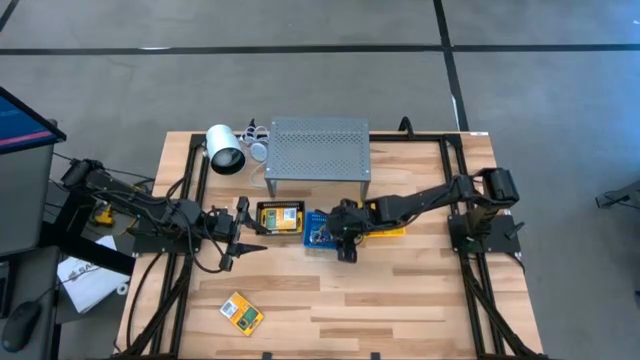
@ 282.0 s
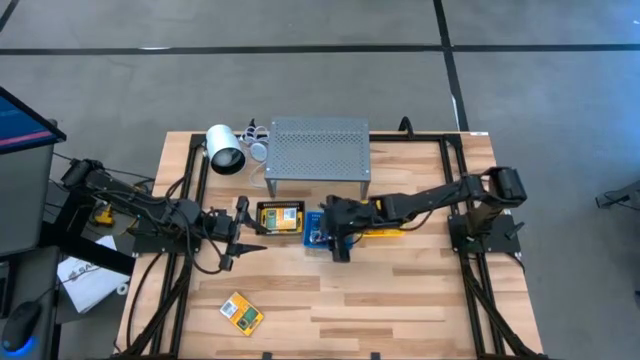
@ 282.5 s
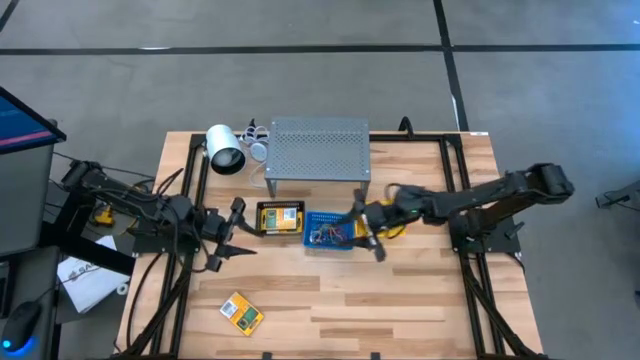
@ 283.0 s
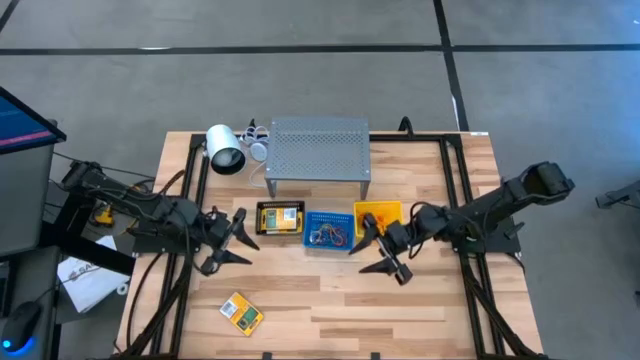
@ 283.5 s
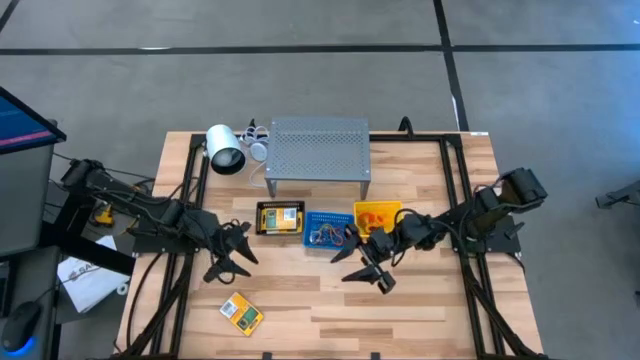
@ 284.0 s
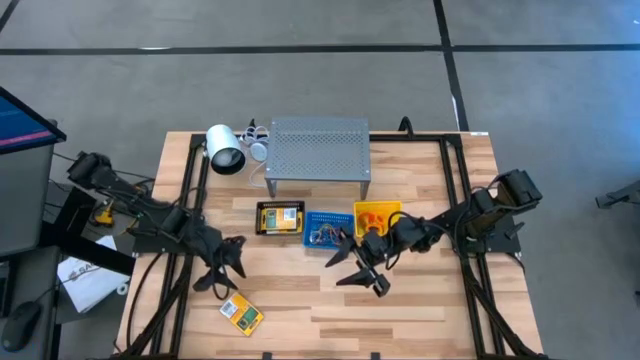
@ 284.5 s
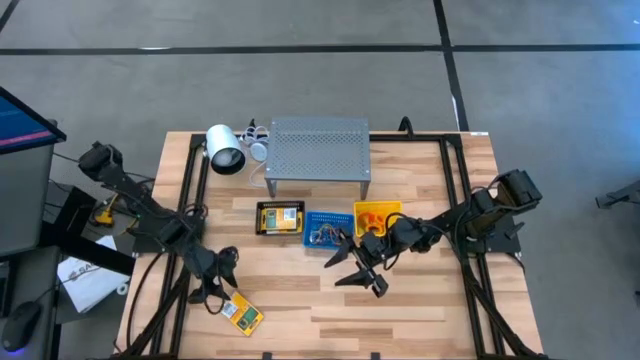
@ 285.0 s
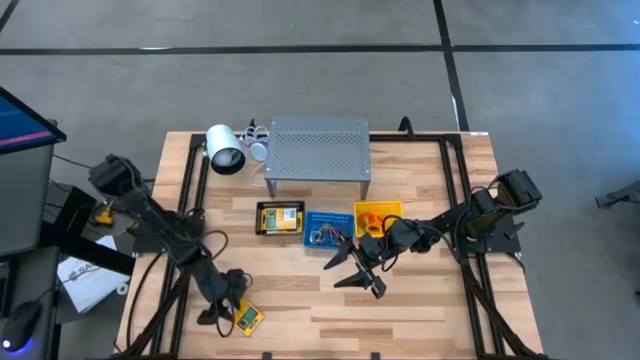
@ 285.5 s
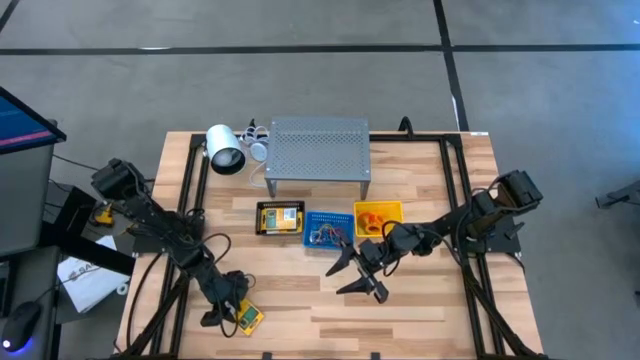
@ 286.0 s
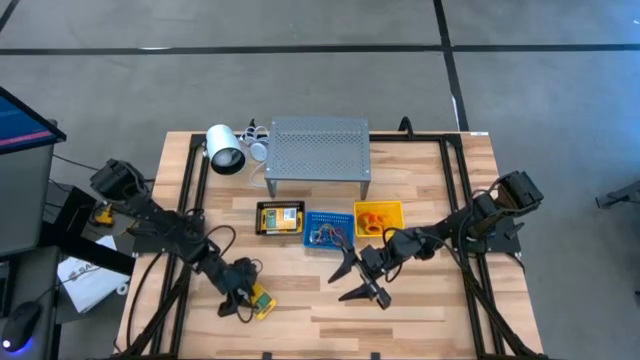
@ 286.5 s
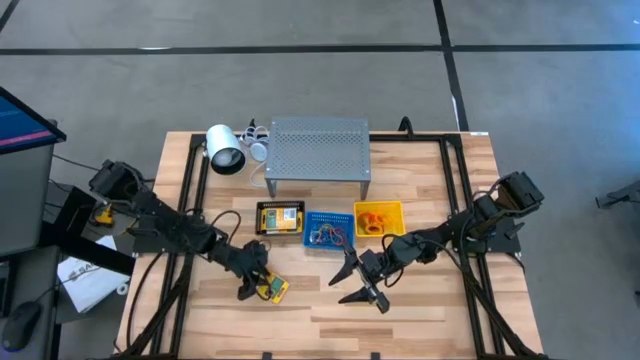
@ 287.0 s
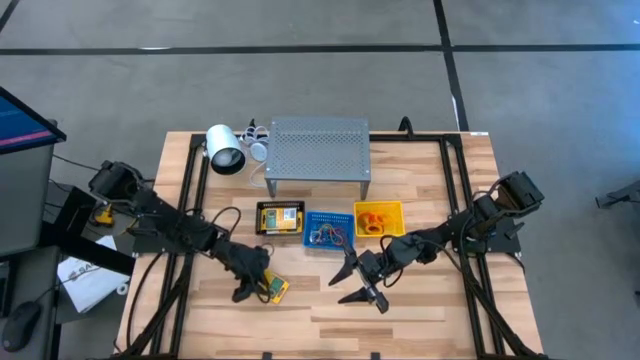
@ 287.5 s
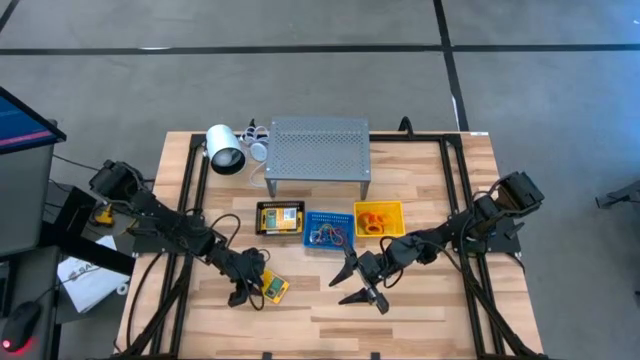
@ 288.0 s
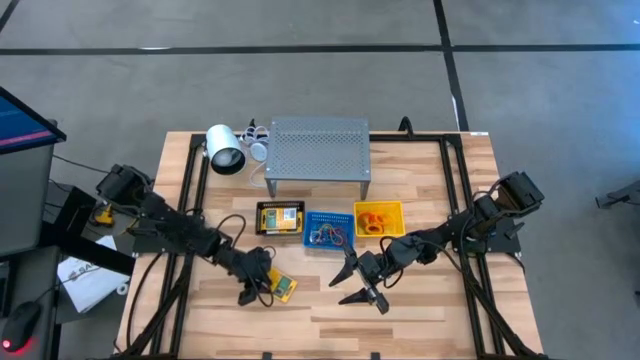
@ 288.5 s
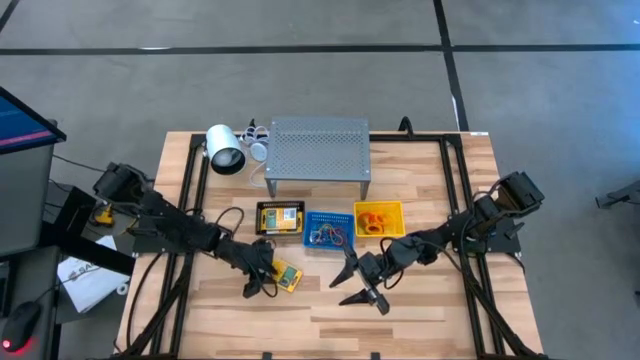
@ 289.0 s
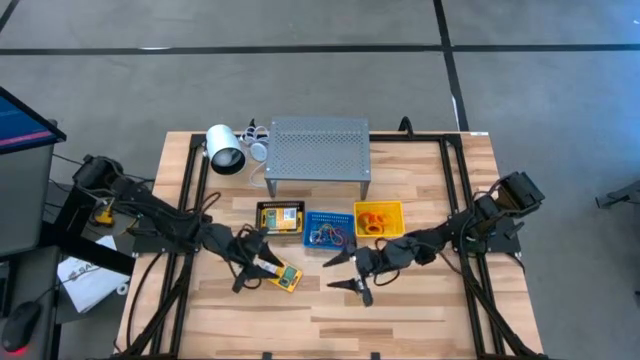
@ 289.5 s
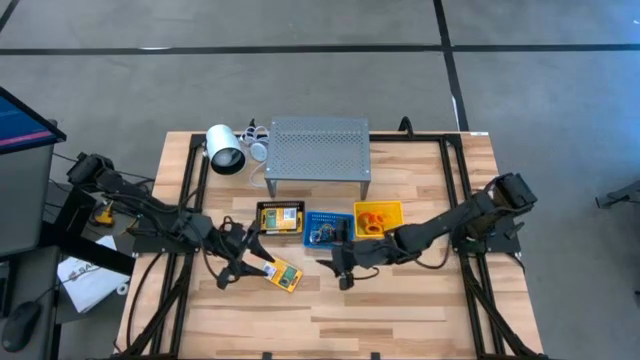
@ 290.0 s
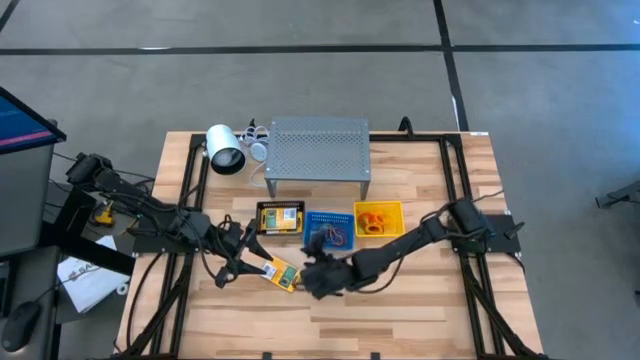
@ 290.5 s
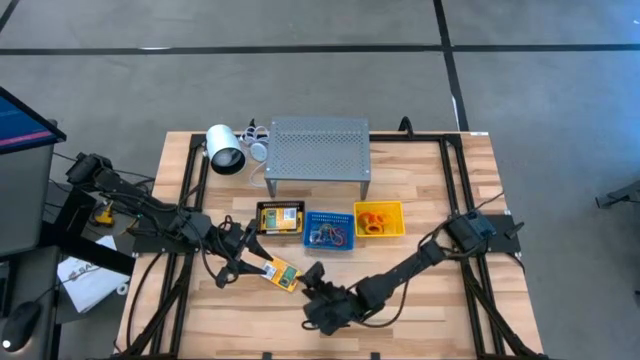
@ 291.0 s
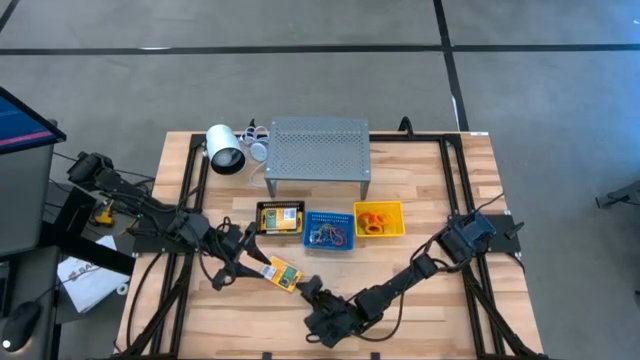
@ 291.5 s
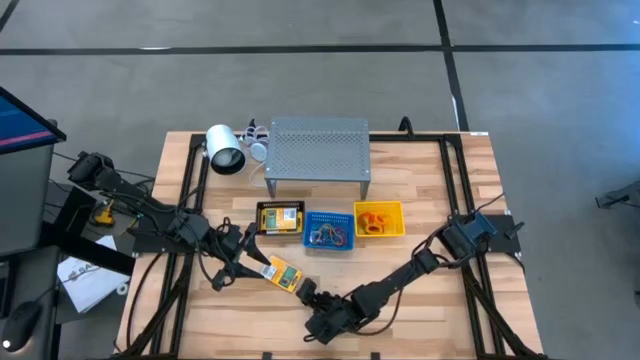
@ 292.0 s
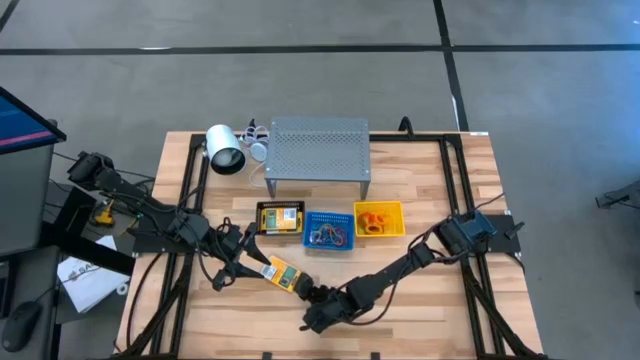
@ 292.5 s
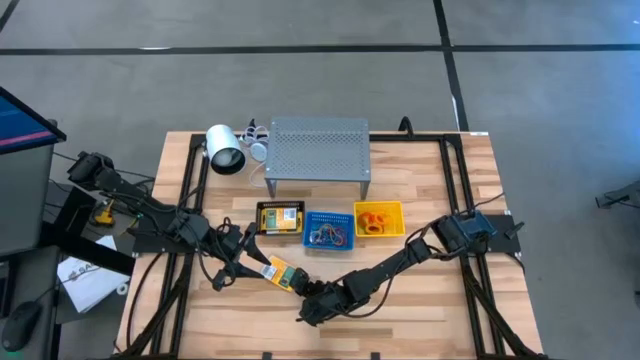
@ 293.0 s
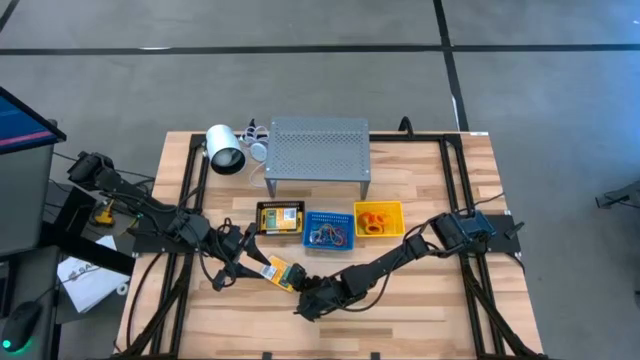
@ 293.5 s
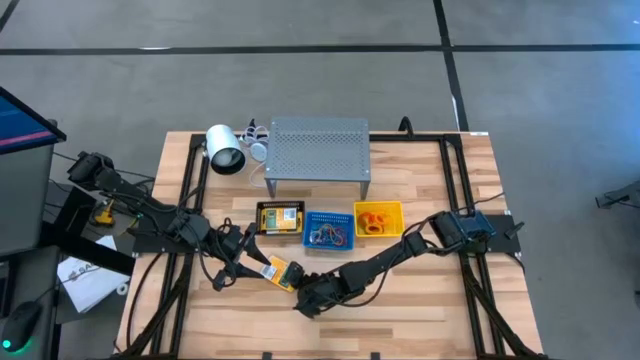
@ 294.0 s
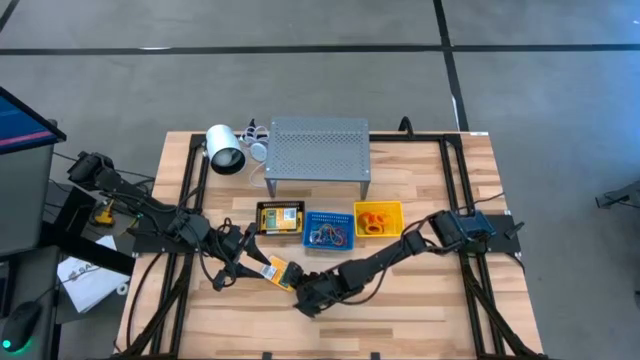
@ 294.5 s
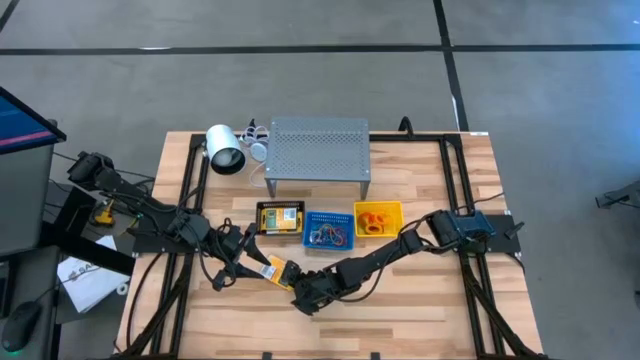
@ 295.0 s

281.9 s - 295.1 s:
Task: Pick & Place Office Desk Supplies
Put the box of crayons into the black bin

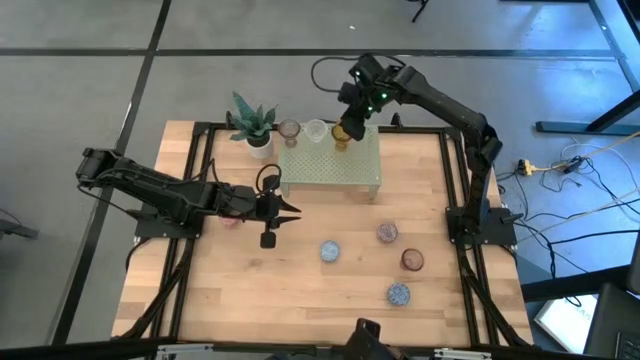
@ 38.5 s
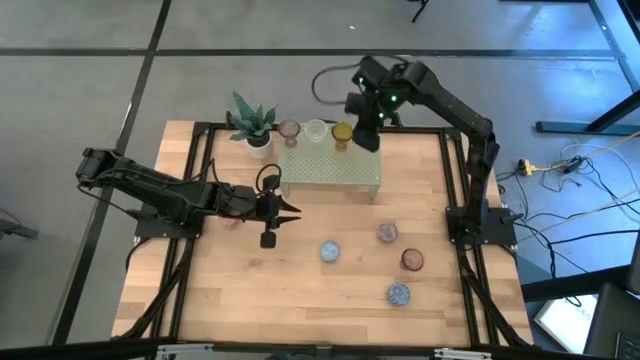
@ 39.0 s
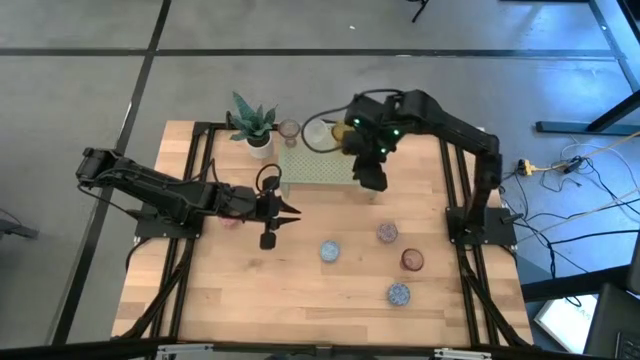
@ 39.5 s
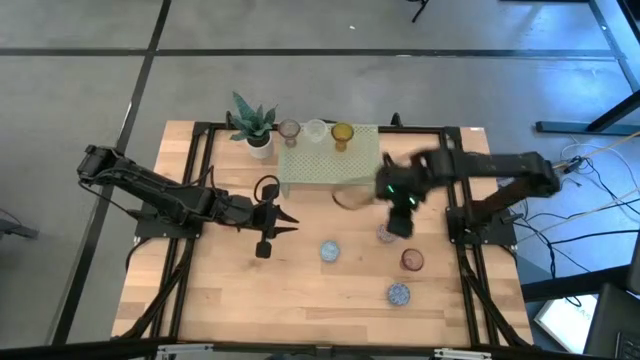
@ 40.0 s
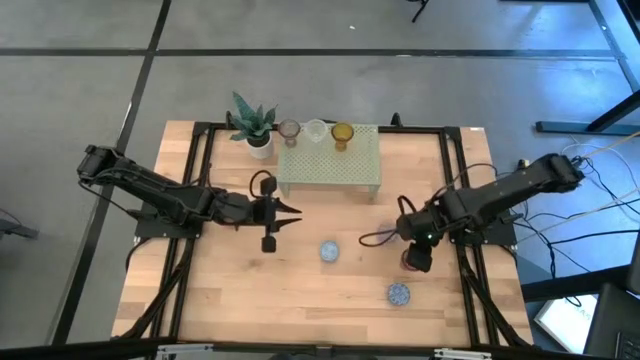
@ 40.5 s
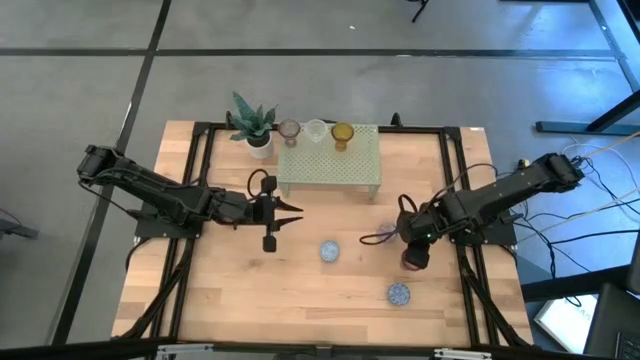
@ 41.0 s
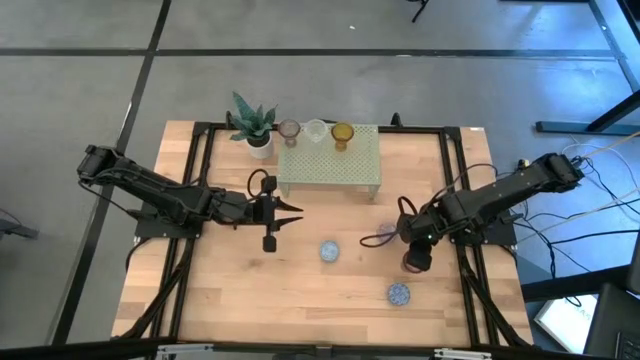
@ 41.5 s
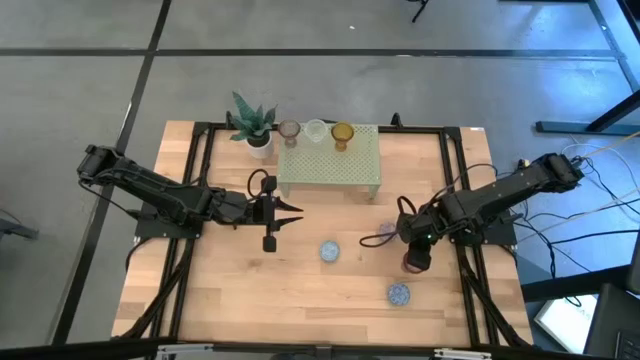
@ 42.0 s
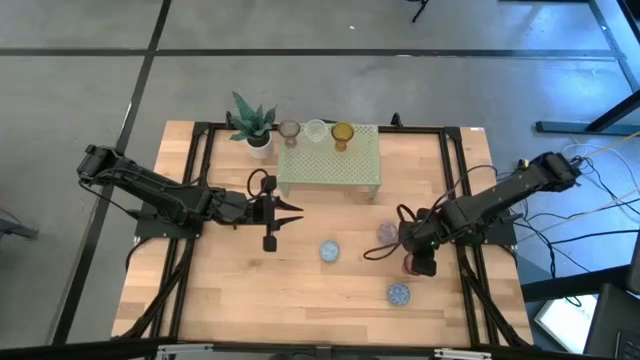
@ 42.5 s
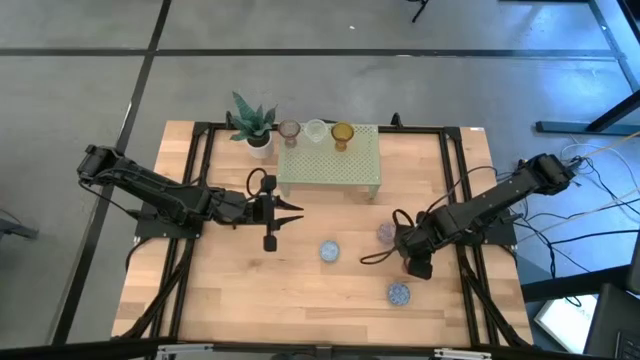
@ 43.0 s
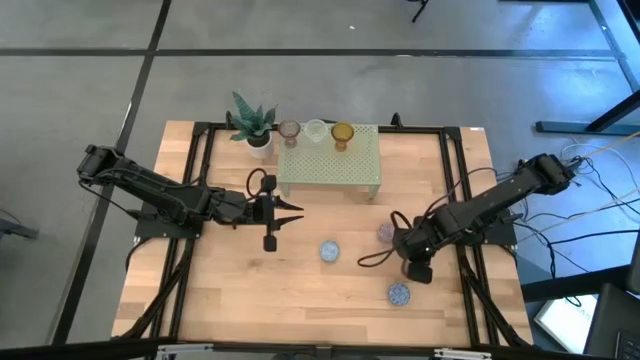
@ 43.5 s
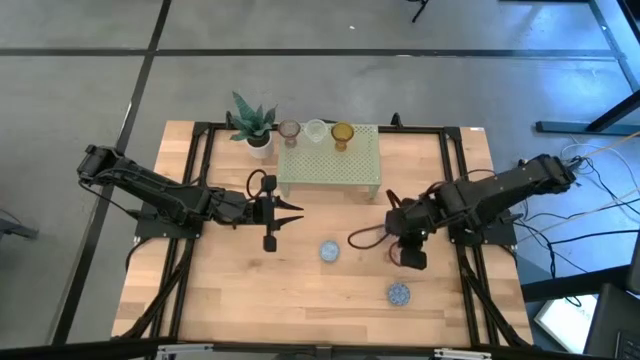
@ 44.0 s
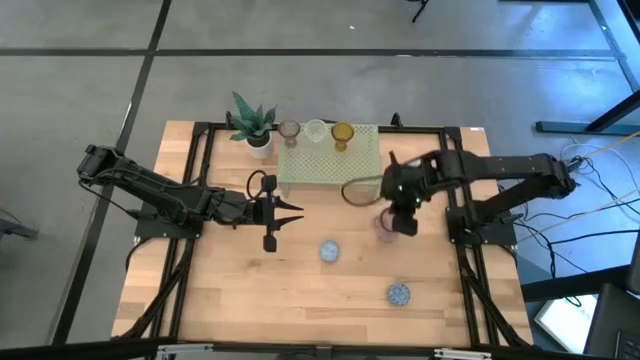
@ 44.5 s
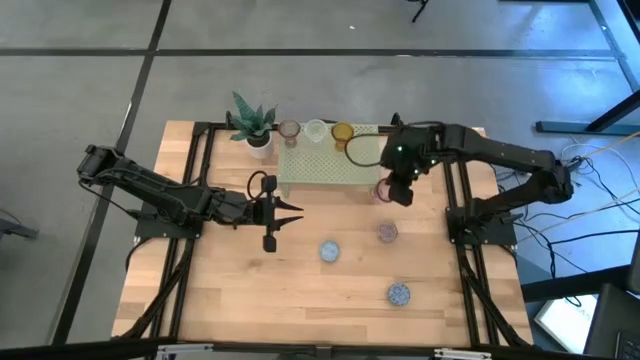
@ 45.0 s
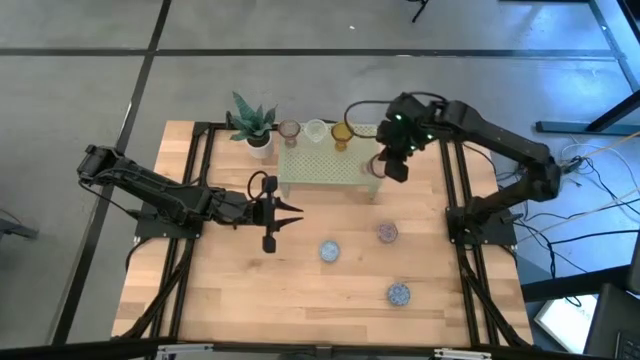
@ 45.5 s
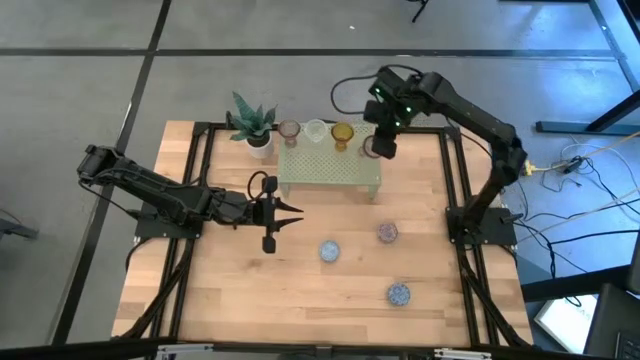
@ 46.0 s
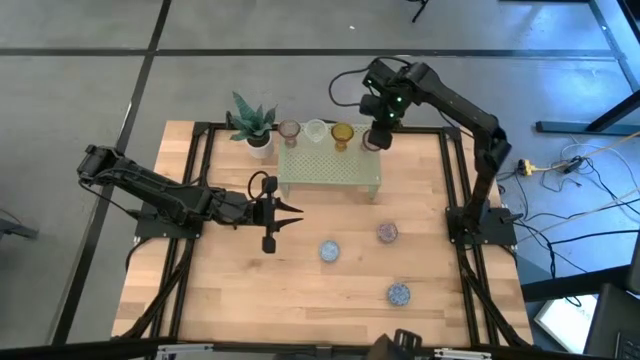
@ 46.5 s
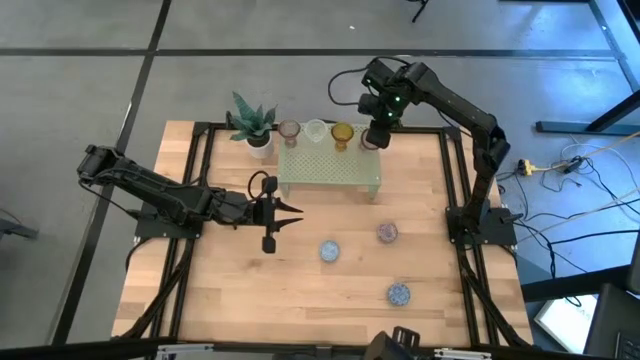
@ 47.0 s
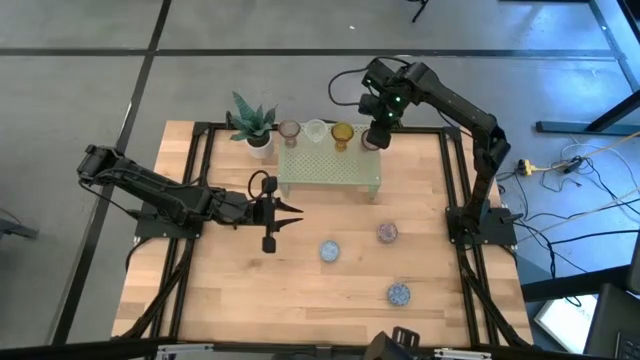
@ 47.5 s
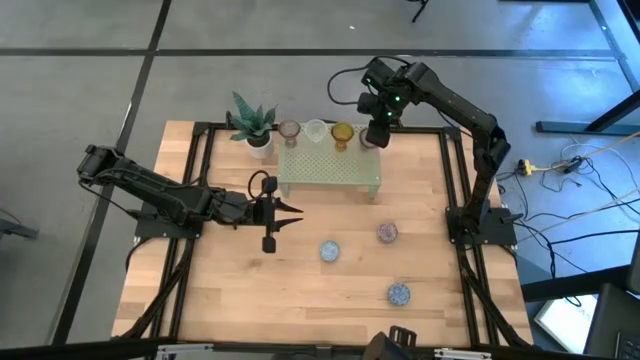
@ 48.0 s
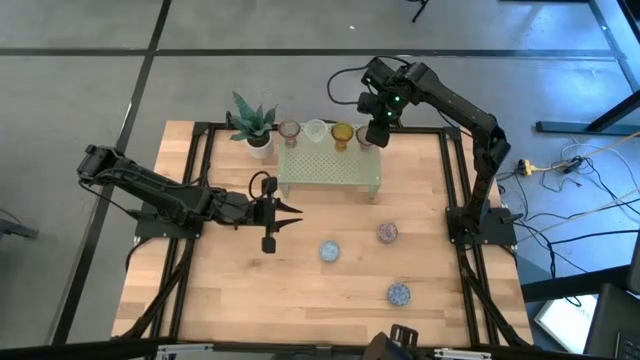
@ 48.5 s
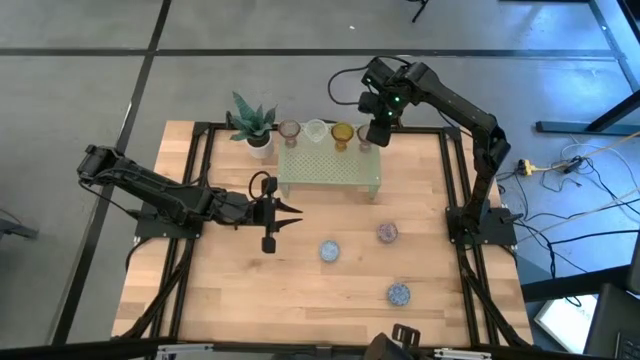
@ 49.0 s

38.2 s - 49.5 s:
Task: Pick & Place candle stick holders
Put the purple glass candle holder on the shelf
